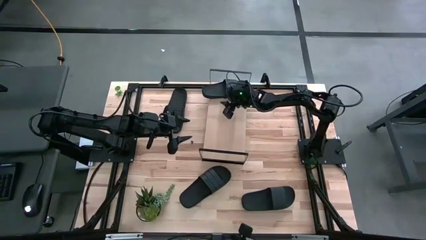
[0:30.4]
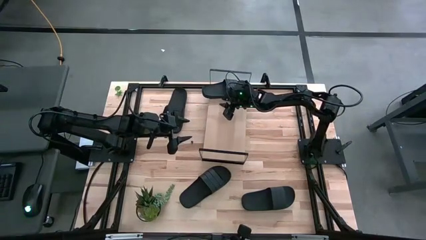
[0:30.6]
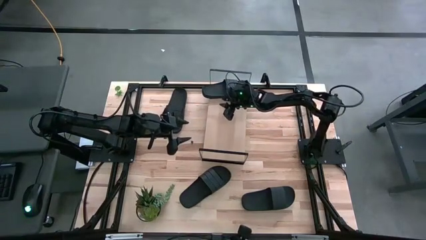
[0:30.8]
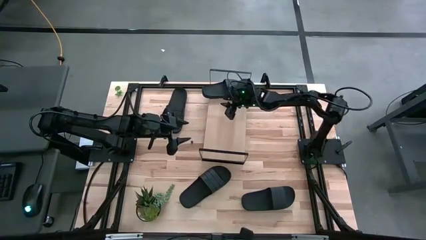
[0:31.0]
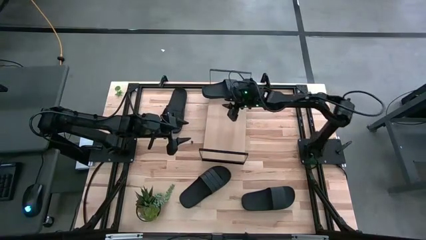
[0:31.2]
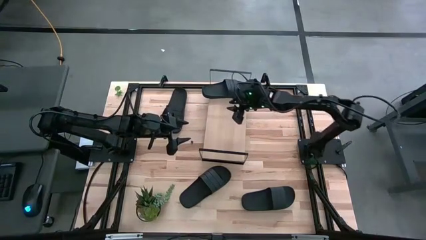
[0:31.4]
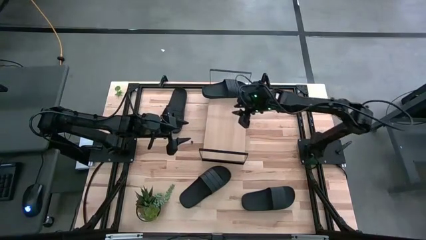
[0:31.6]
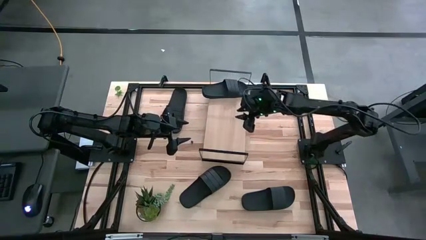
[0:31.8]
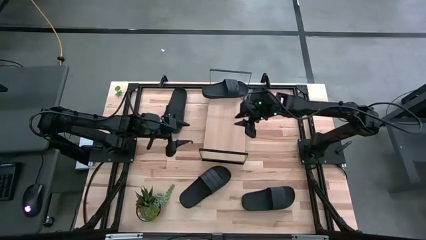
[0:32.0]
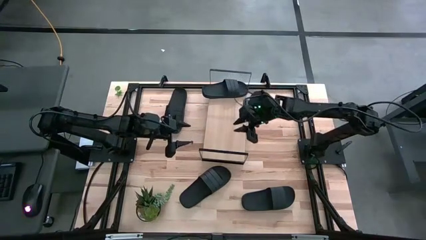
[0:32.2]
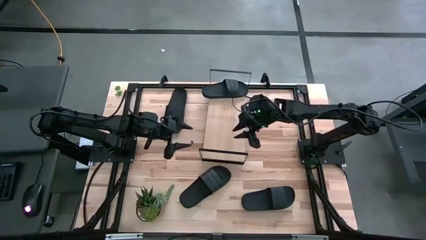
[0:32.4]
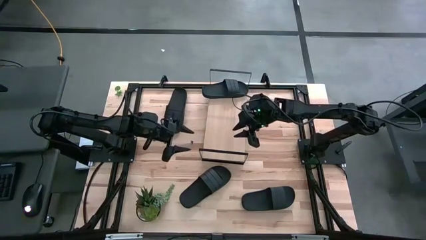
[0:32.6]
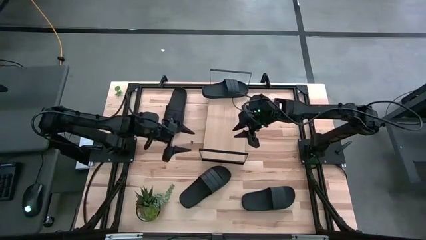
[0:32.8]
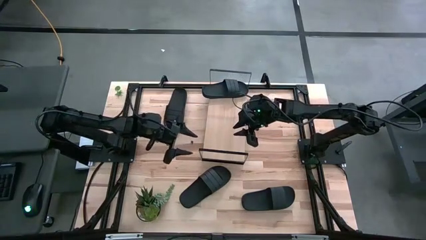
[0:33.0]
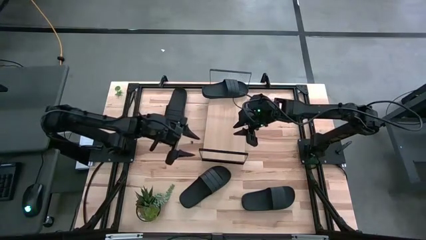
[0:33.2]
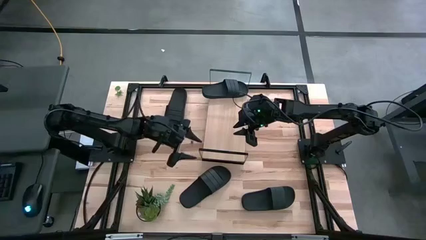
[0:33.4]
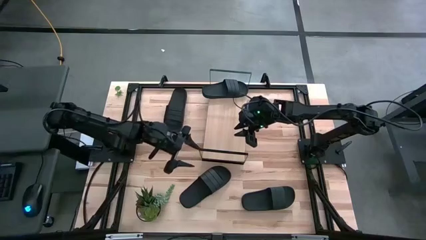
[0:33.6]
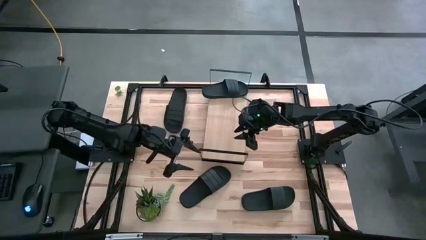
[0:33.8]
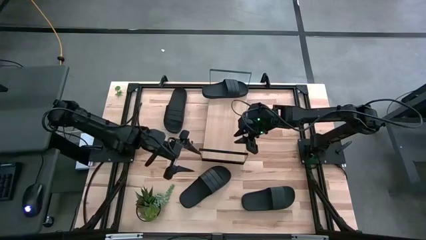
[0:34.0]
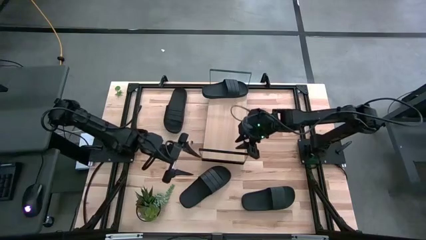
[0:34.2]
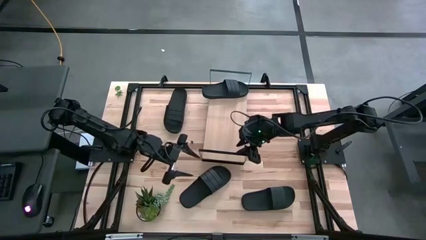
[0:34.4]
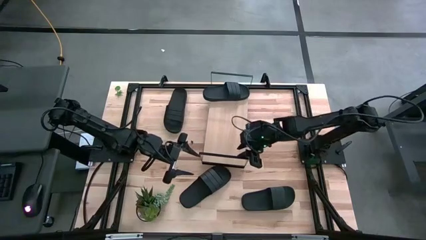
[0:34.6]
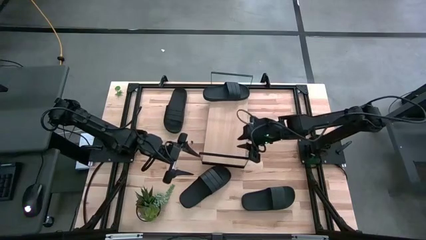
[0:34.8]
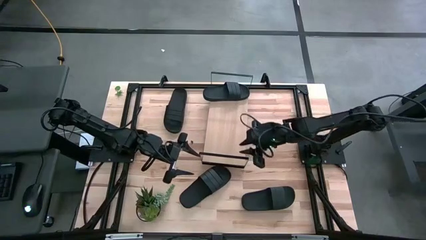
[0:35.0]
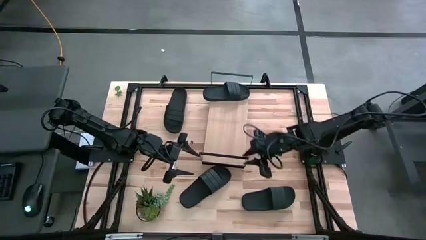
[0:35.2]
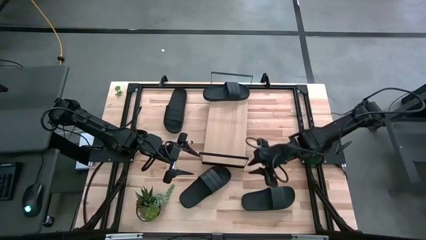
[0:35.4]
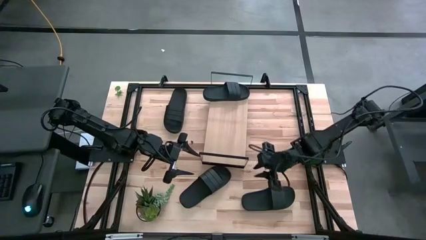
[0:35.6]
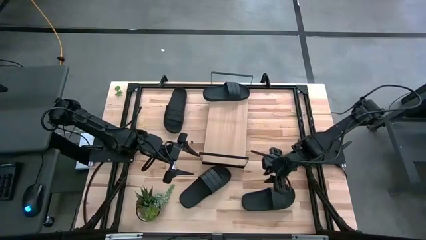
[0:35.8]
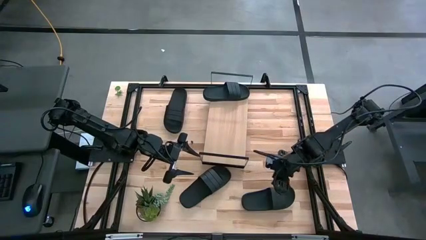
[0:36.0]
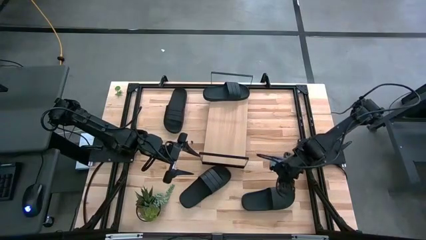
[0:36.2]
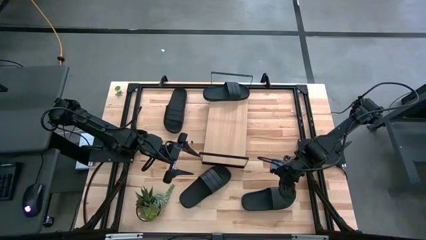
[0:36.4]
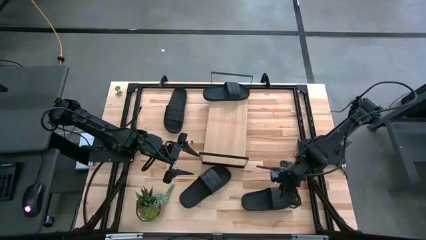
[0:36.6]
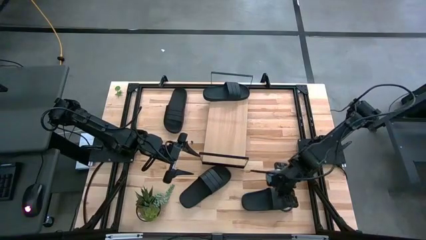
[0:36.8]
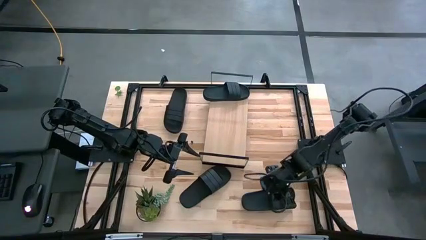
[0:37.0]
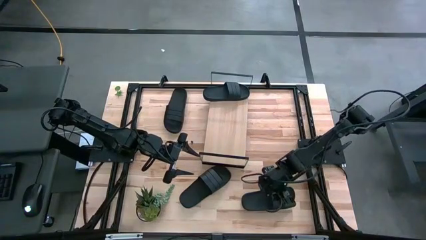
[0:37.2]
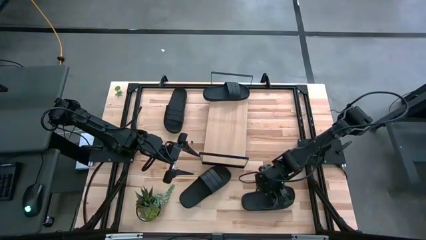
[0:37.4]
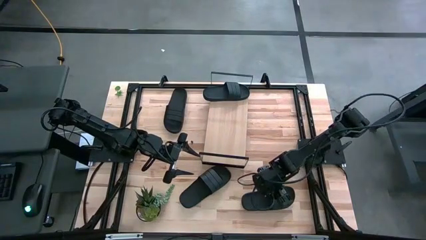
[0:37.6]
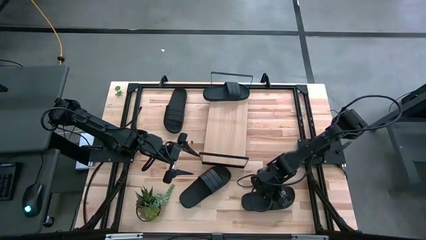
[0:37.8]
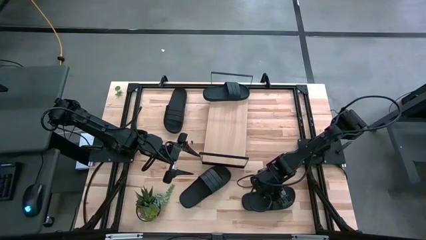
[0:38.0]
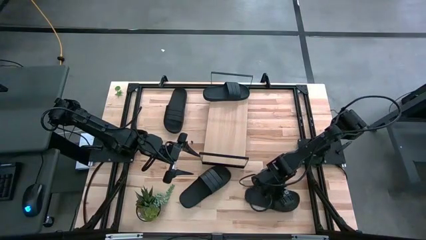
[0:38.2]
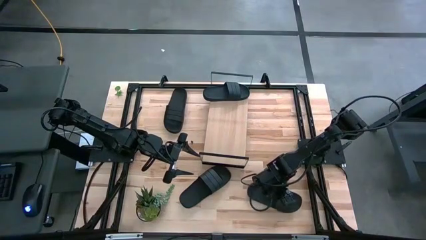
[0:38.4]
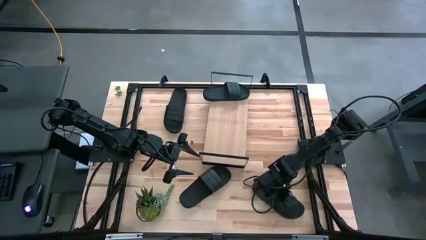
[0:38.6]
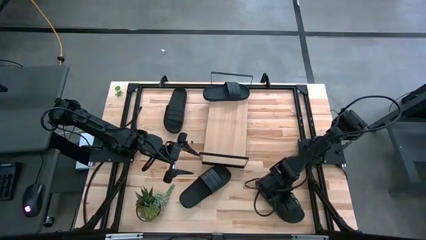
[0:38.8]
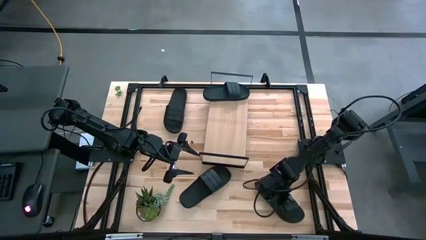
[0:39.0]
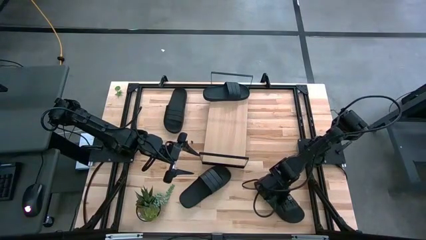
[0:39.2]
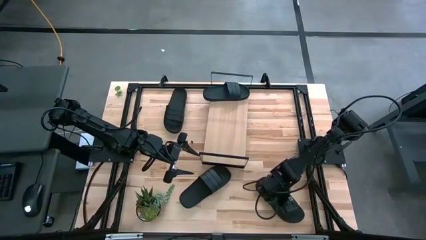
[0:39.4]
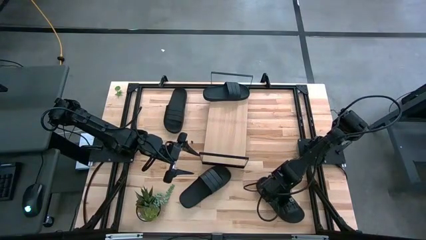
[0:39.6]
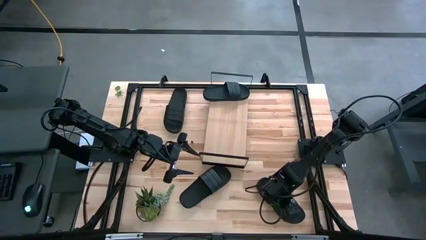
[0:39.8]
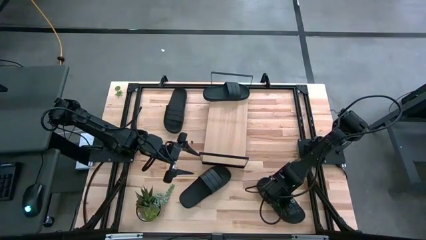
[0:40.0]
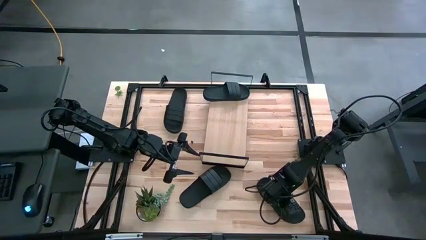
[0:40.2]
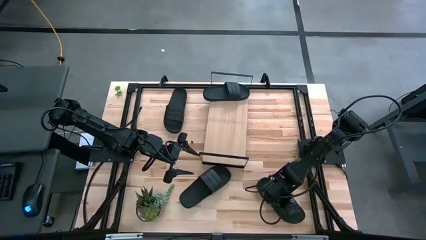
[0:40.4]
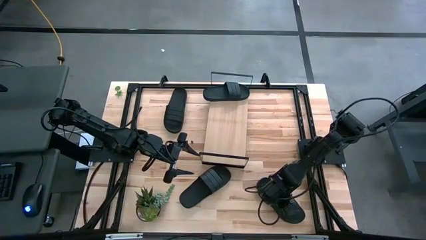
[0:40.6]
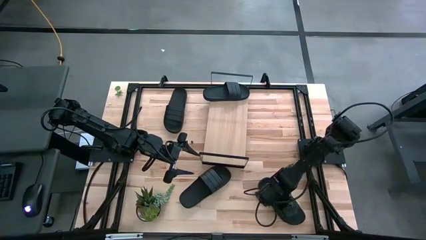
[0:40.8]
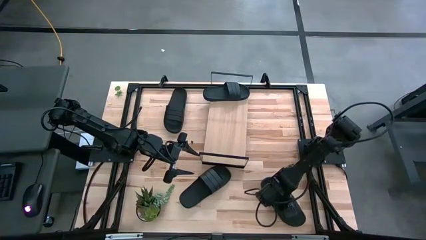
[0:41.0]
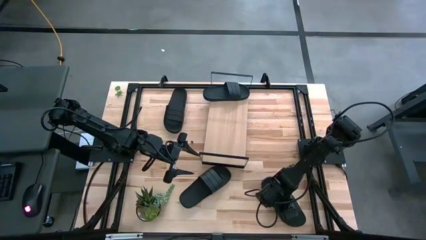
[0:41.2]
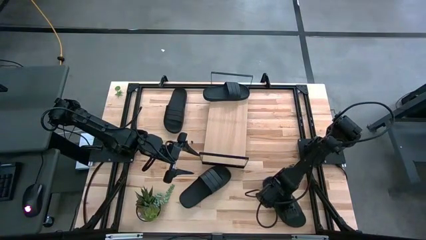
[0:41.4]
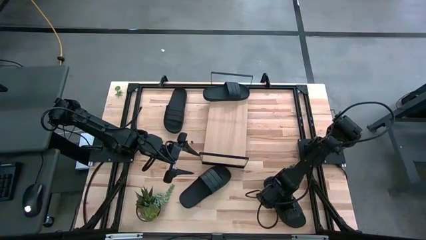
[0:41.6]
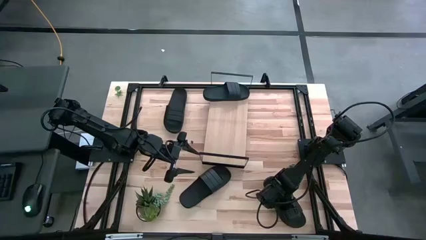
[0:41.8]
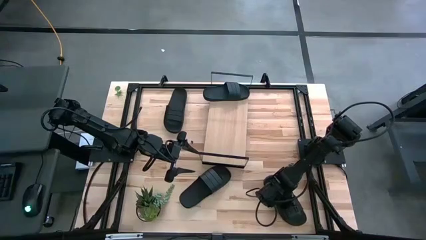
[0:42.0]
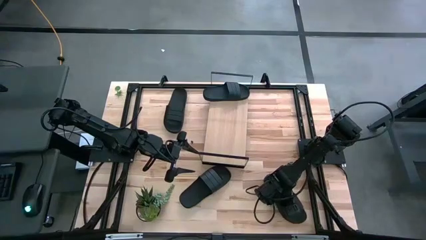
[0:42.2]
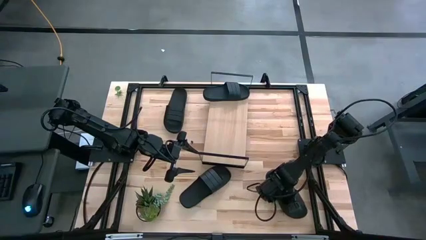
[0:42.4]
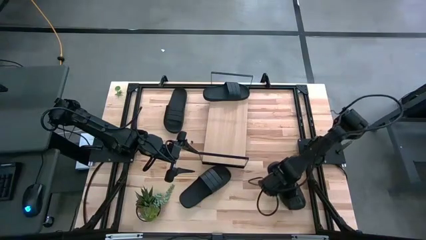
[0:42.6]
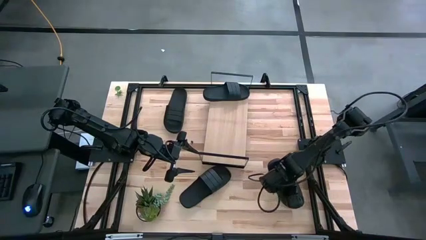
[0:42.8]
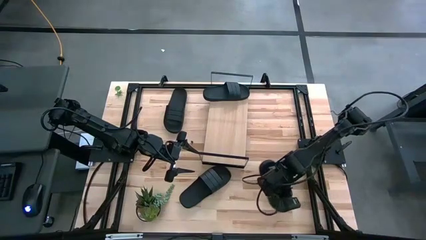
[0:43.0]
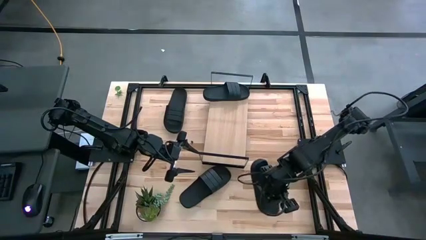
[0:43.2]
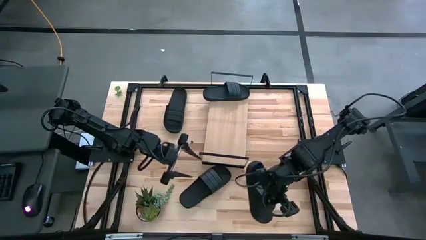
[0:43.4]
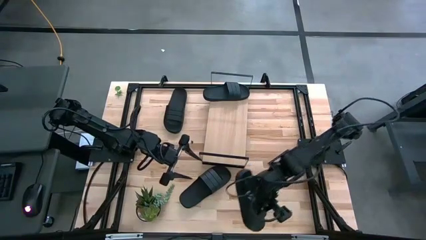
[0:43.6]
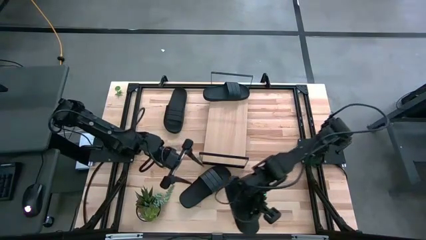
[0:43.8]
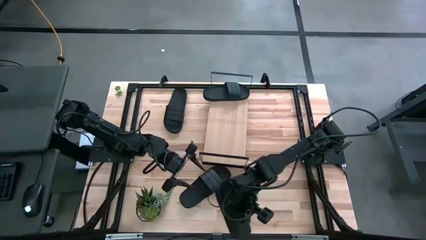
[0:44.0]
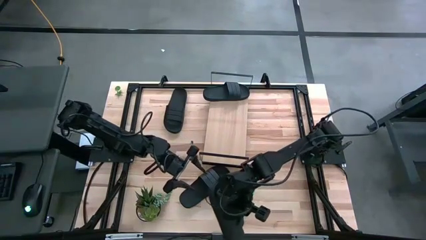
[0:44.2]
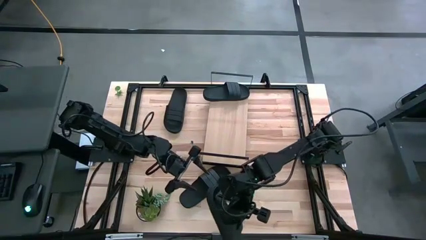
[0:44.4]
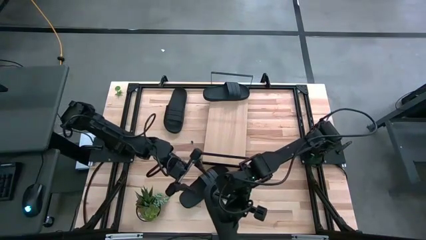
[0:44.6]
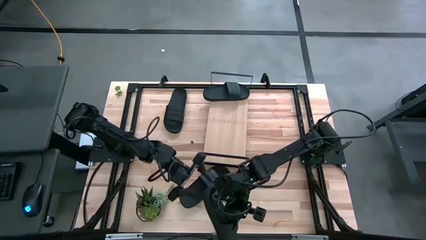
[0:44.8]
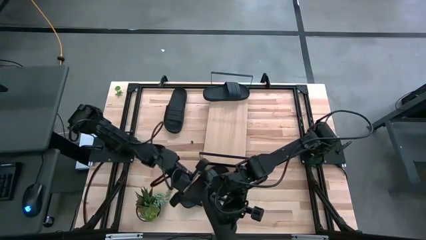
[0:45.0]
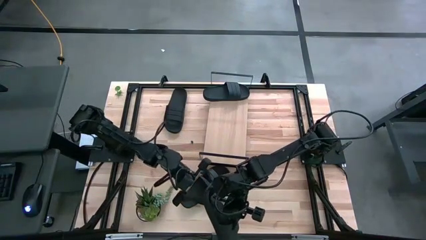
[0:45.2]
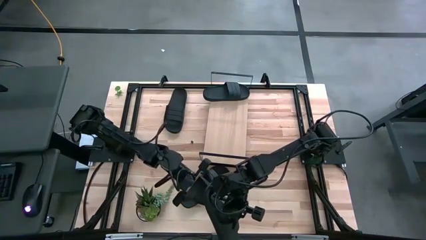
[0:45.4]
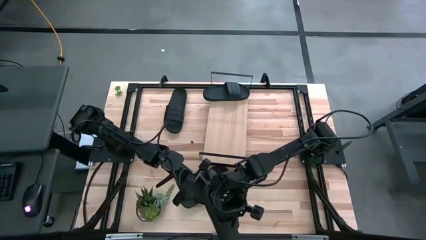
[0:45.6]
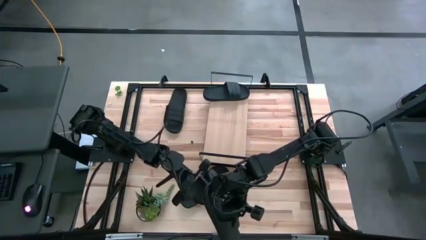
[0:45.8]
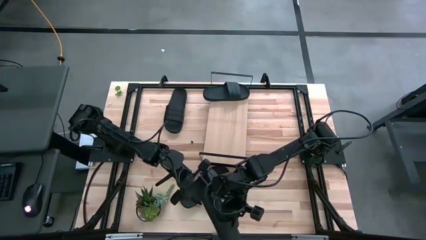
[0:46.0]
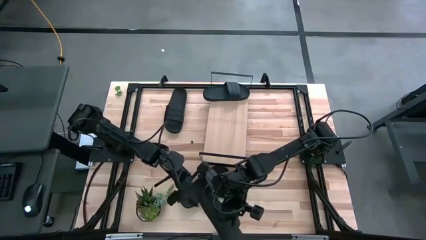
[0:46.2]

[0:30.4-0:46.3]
Task: Pick and place slides into the shelf
Put the bottom right black slide on the shelf
